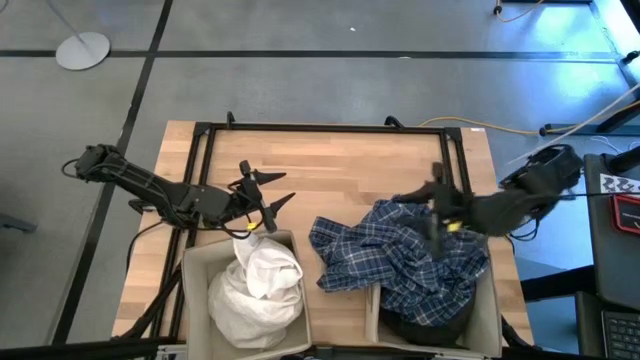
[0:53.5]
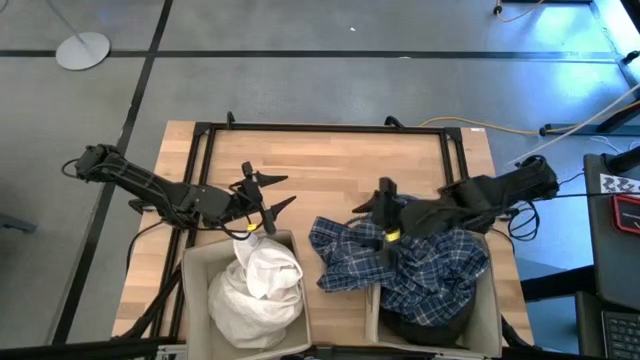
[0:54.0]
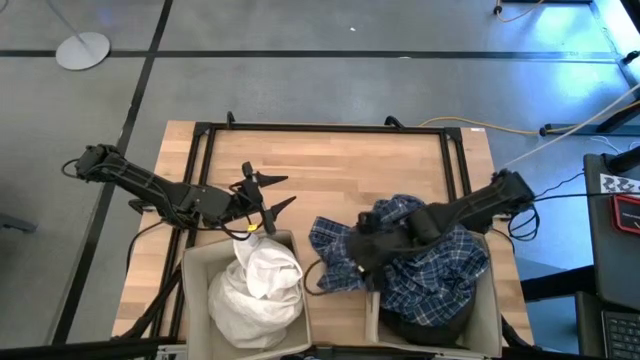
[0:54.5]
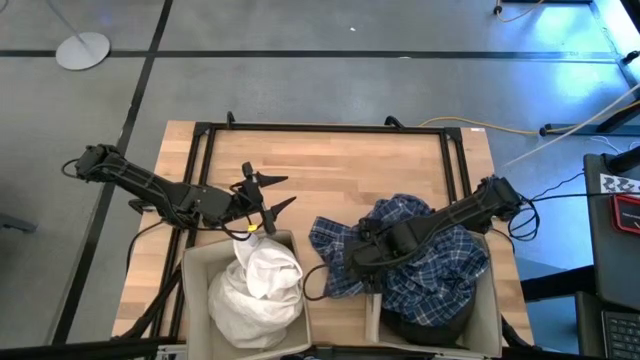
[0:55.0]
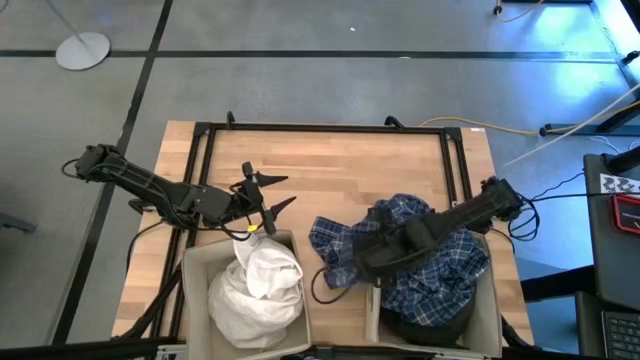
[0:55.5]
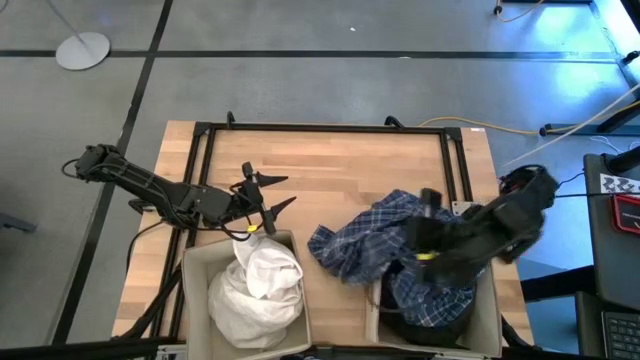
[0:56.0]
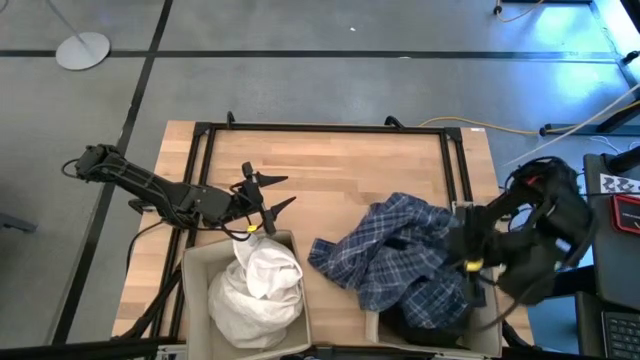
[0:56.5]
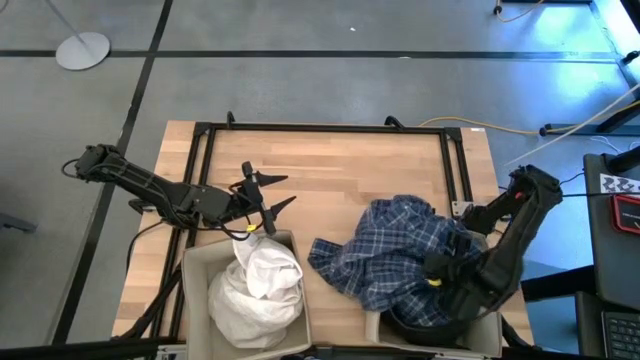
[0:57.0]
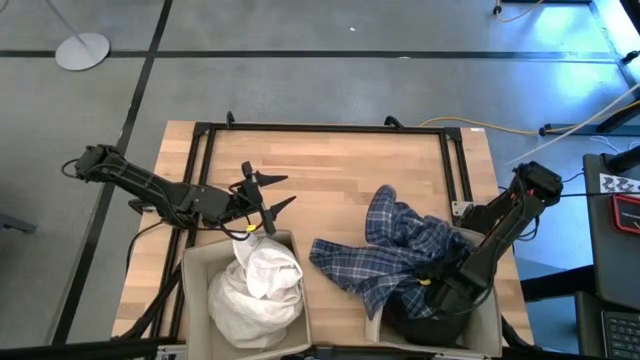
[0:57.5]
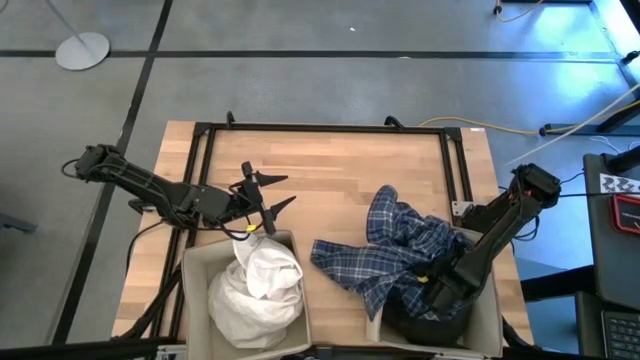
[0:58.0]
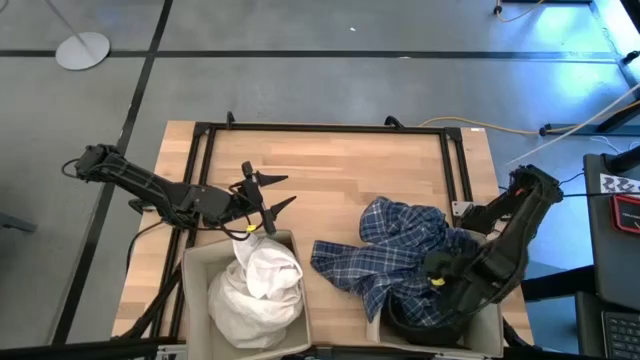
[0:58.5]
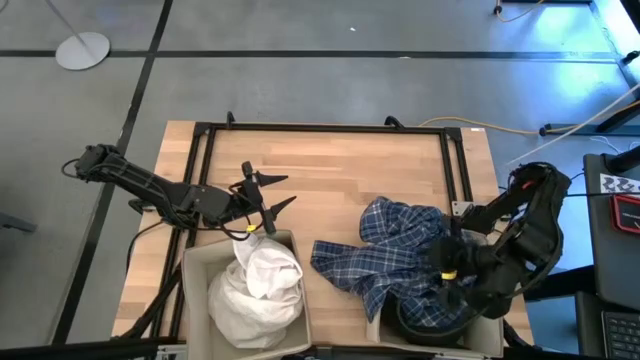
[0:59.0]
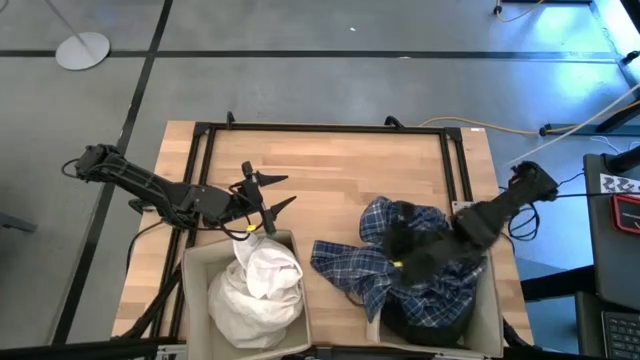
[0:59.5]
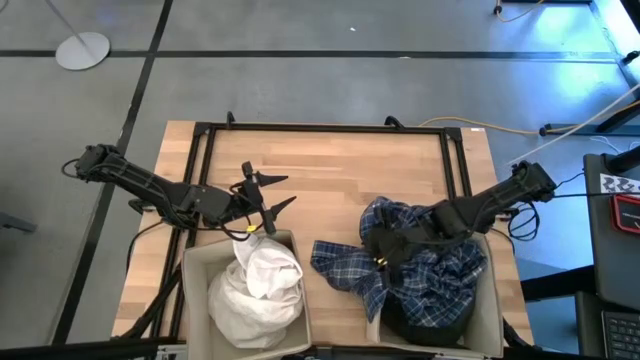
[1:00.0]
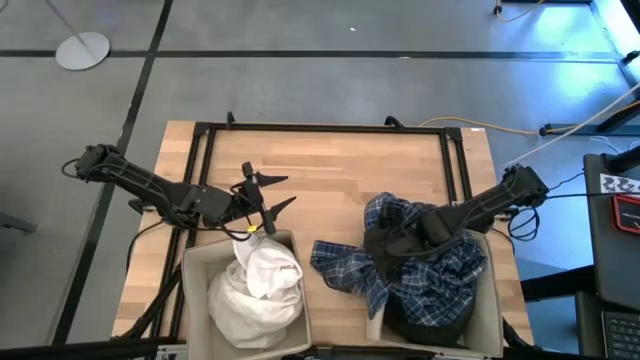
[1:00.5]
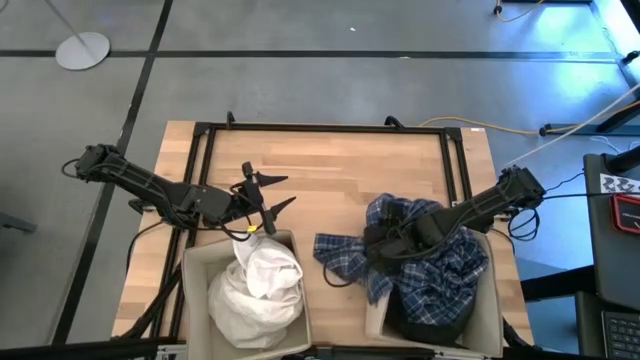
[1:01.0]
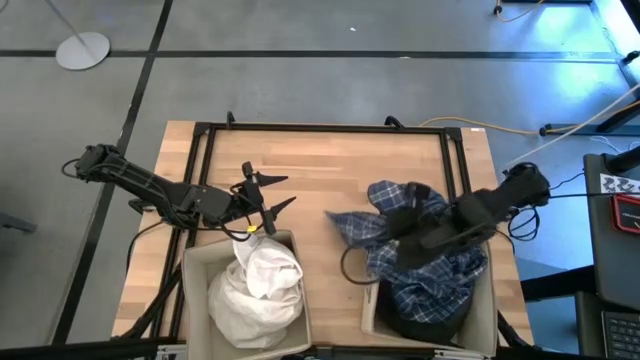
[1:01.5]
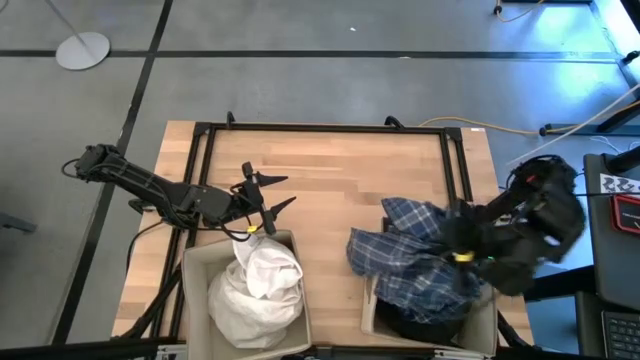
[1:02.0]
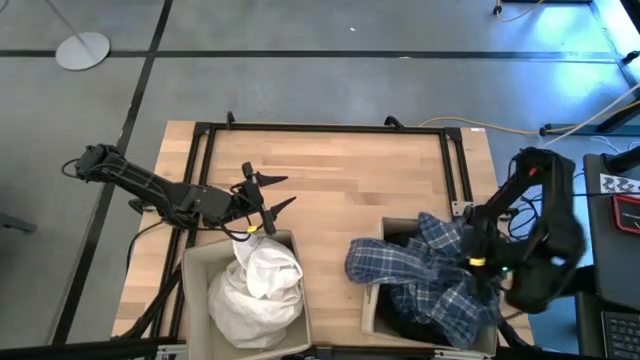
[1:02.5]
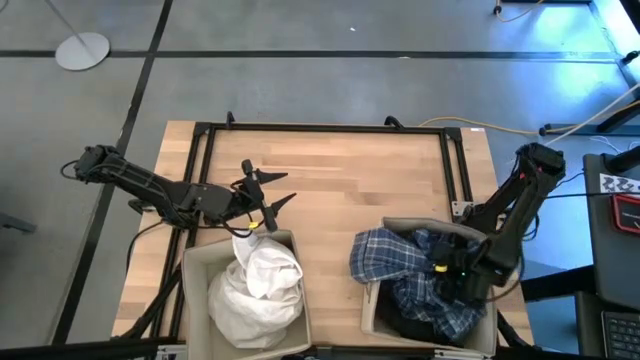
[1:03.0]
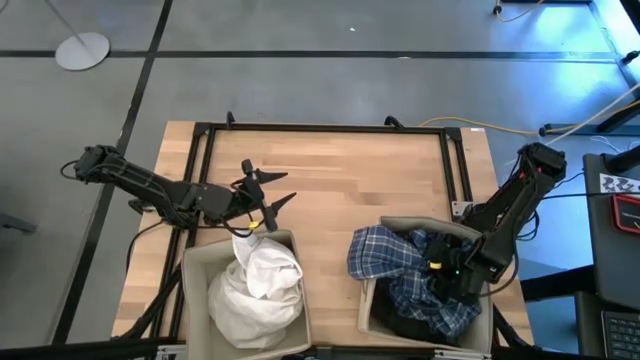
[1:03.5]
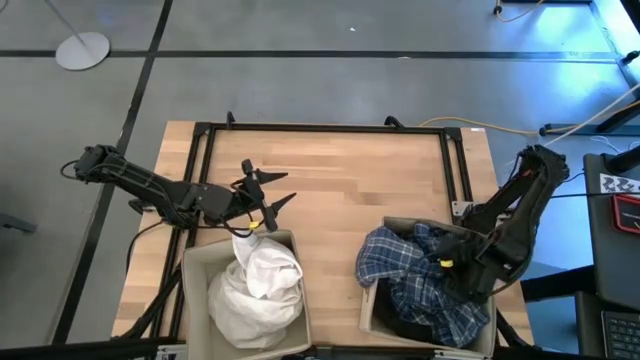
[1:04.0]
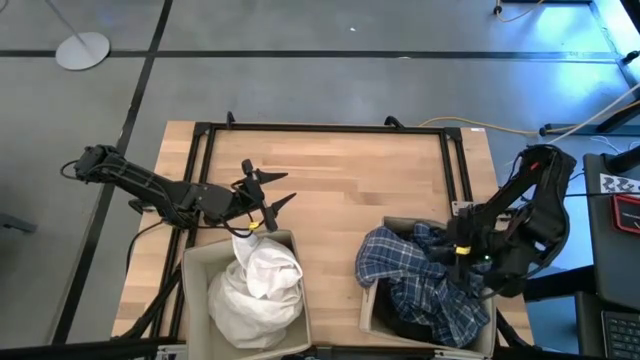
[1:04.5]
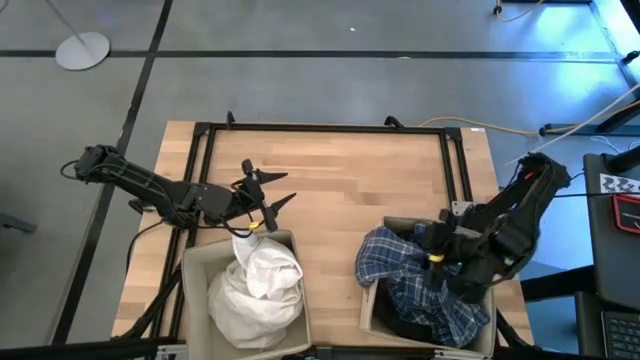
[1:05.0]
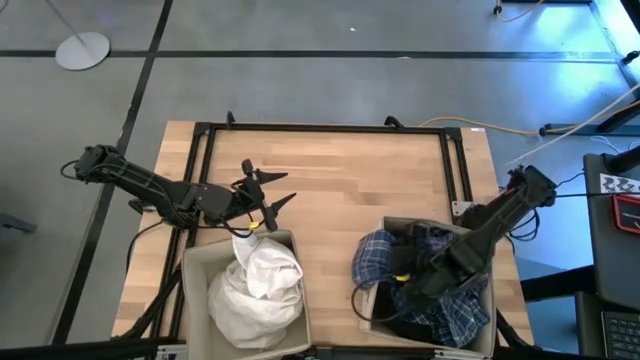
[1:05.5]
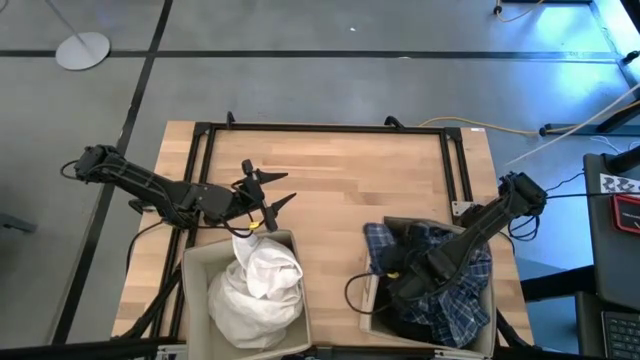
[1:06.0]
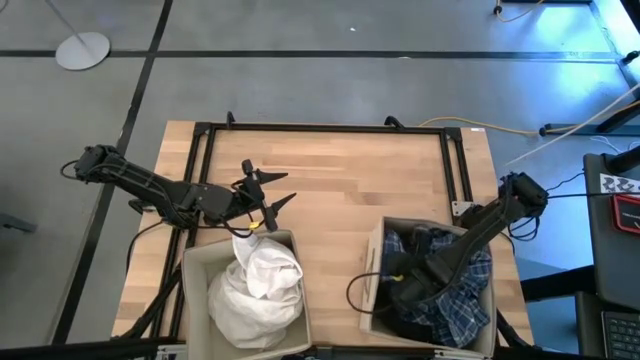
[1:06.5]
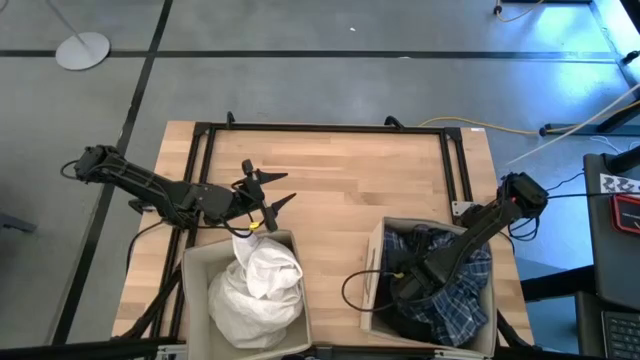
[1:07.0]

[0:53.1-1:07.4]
Task: Sort clothes
Put the blue checkered shirt into the right laundry organizer

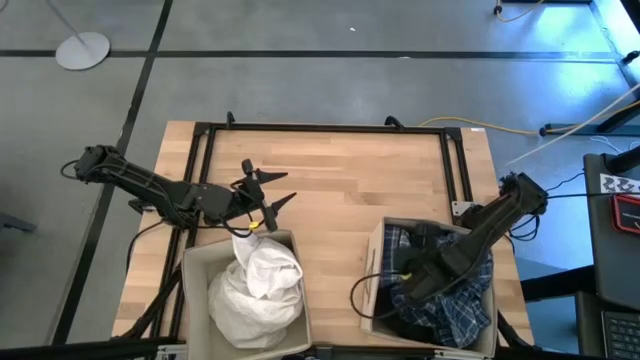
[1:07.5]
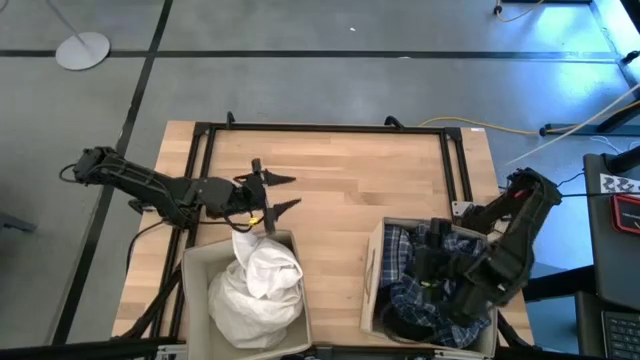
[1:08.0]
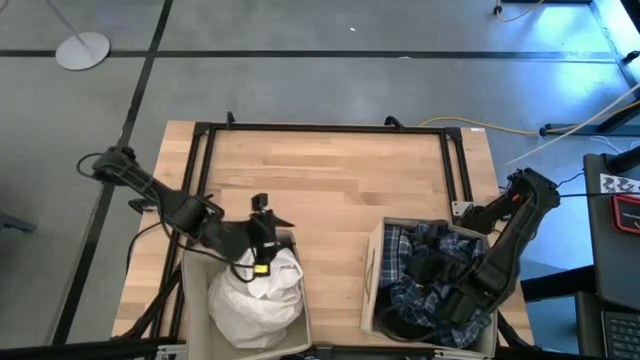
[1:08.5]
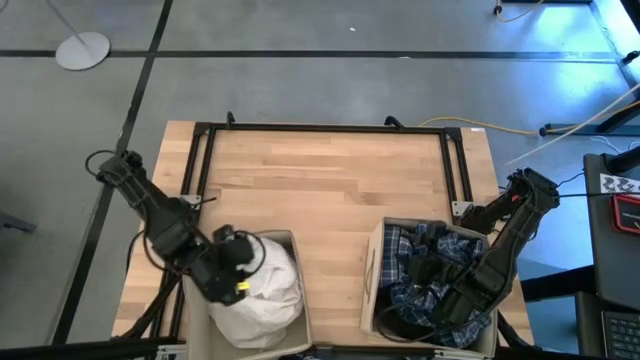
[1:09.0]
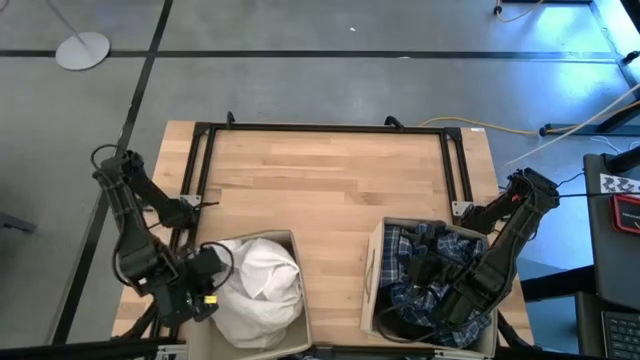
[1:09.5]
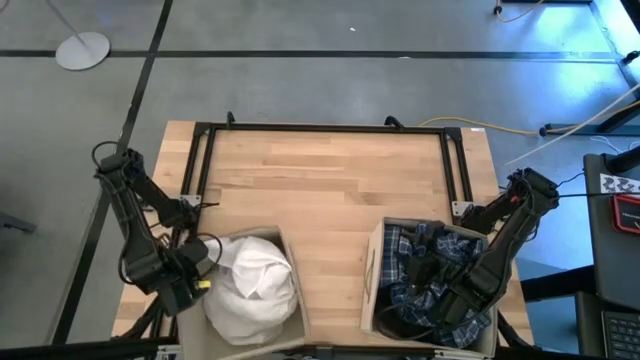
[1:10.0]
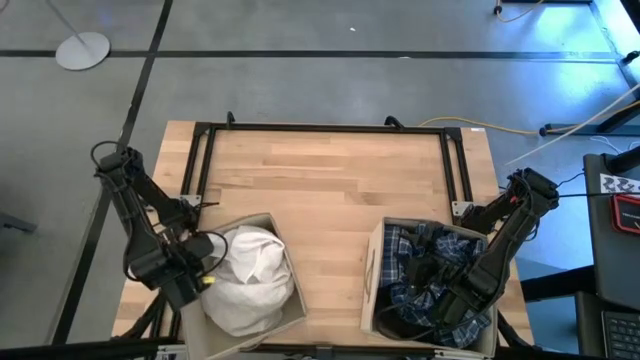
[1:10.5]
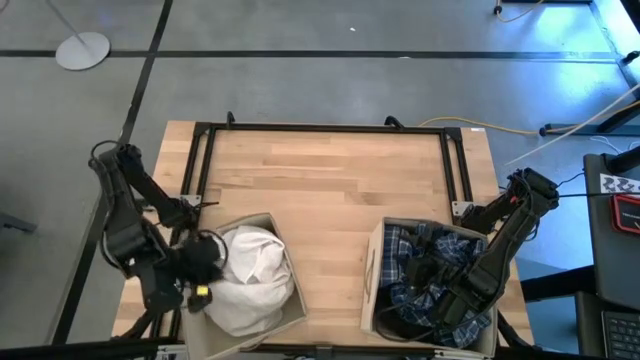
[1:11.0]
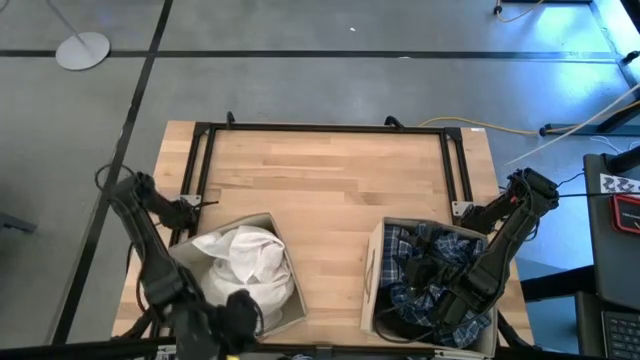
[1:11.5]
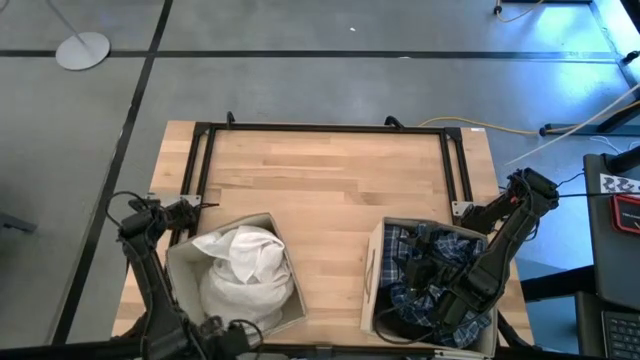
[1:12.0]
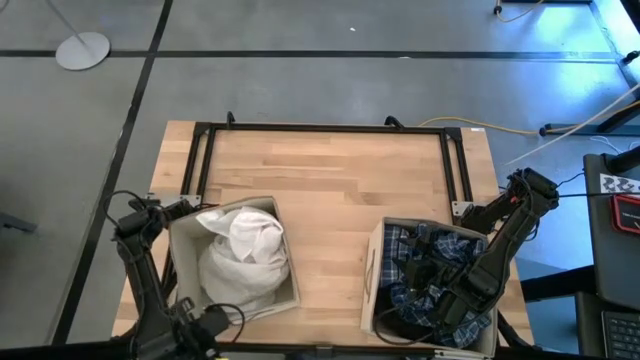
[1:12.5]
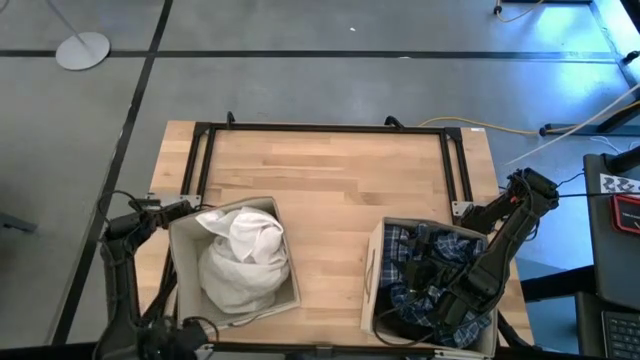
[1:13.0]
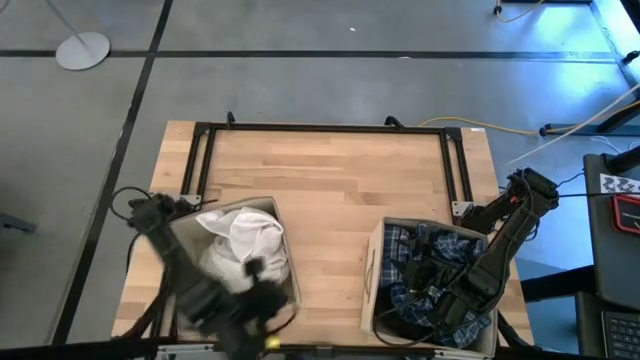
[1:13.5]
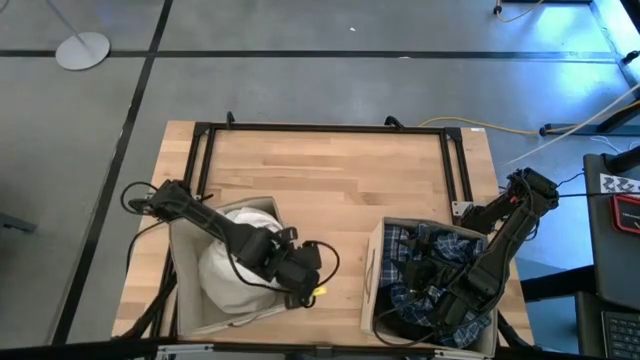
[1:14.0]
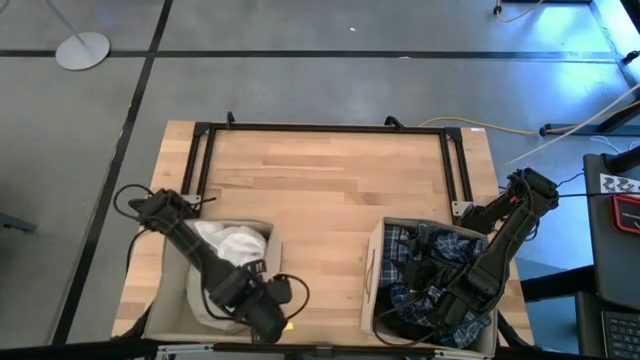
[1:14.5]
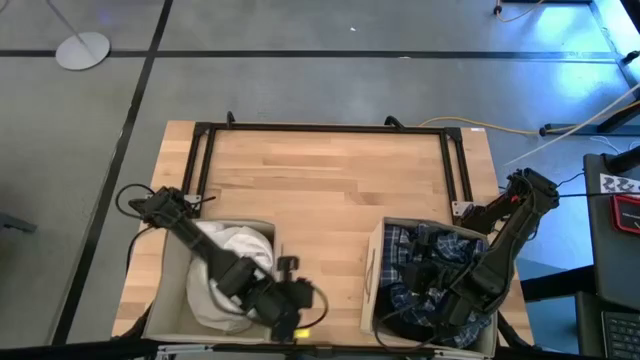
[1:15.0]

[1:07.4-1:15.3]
Adjust the left laundry organizer

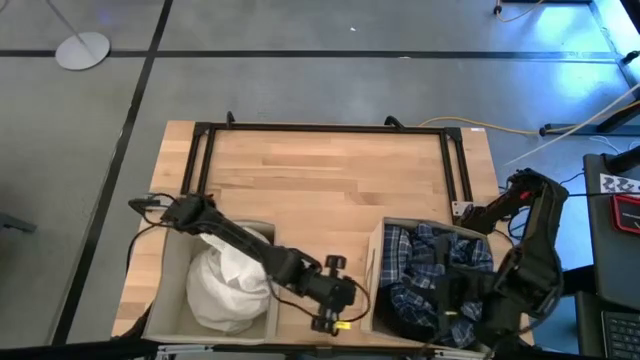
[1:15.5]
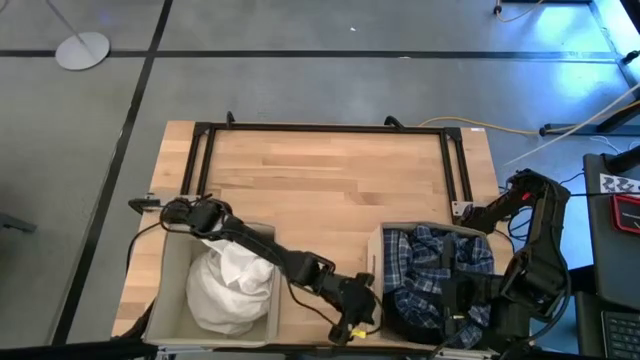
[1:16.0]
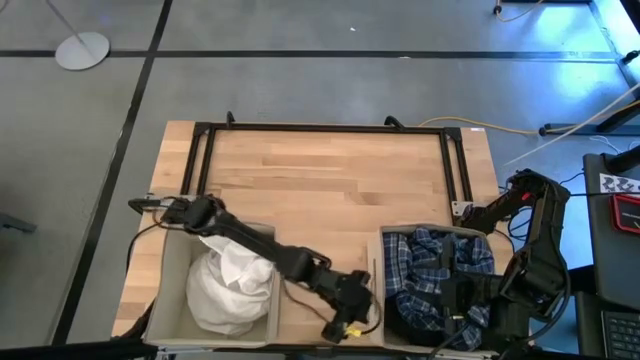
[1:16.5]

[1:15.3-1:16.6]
Adjust the right laundry organizer
